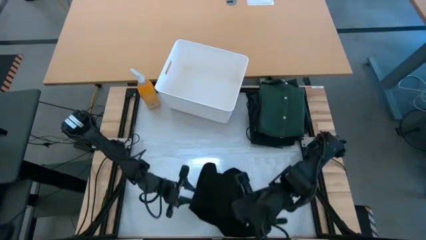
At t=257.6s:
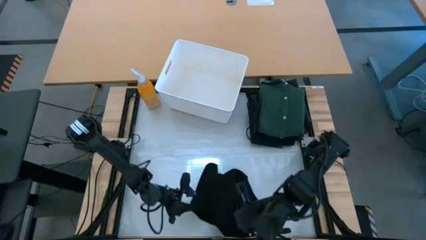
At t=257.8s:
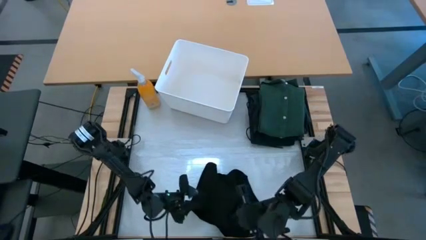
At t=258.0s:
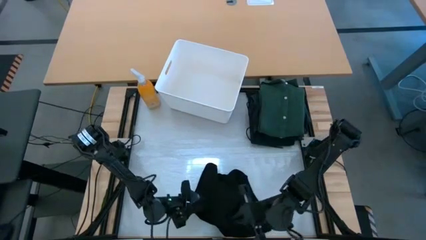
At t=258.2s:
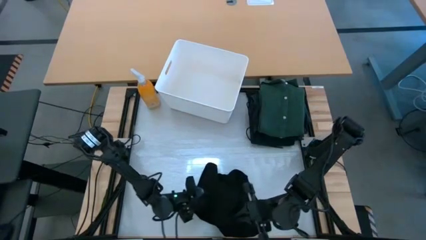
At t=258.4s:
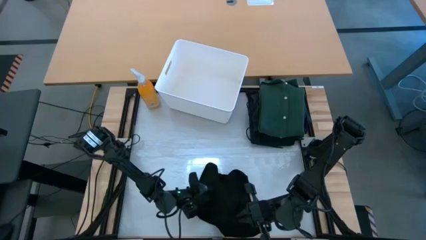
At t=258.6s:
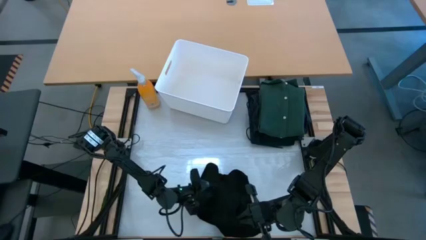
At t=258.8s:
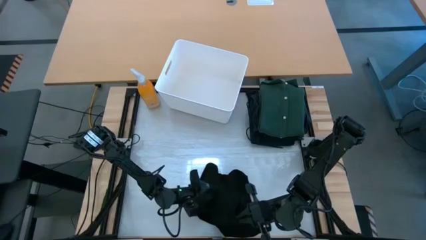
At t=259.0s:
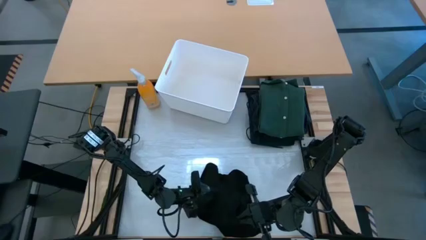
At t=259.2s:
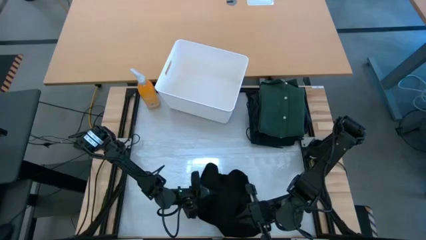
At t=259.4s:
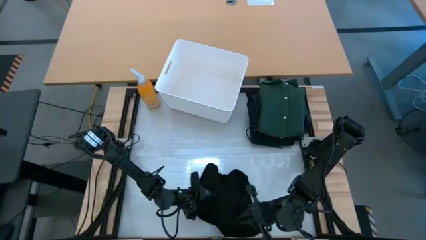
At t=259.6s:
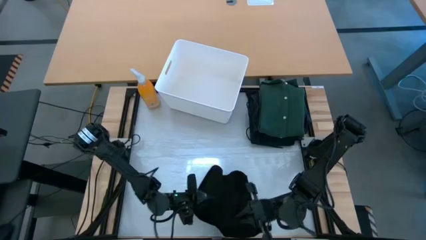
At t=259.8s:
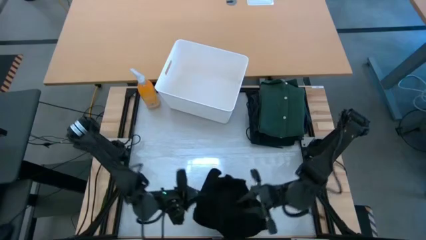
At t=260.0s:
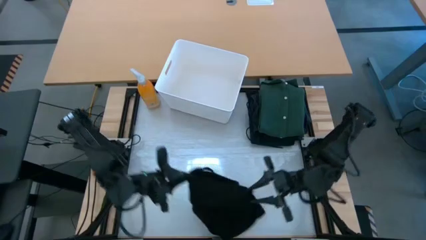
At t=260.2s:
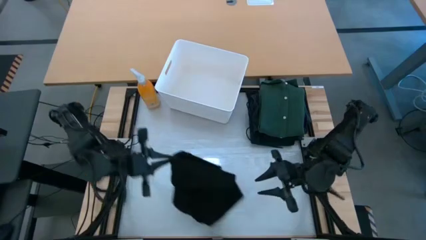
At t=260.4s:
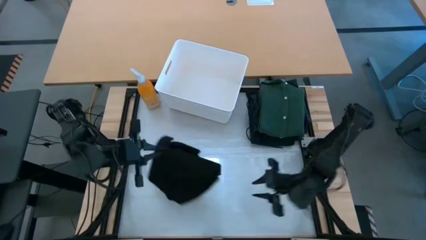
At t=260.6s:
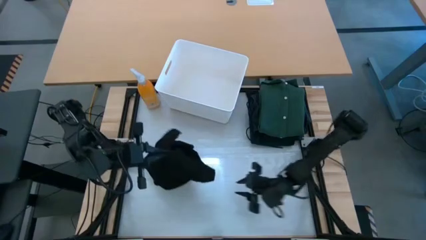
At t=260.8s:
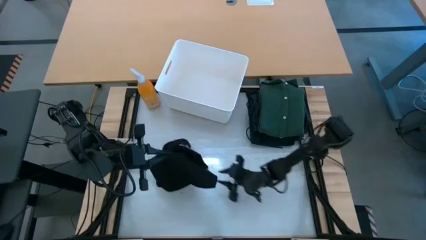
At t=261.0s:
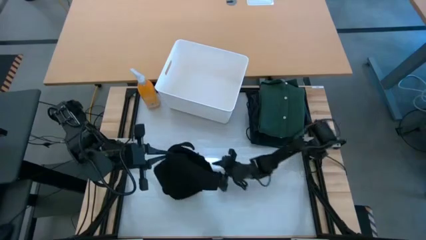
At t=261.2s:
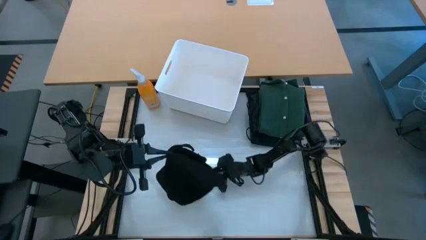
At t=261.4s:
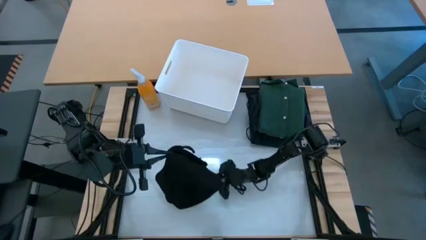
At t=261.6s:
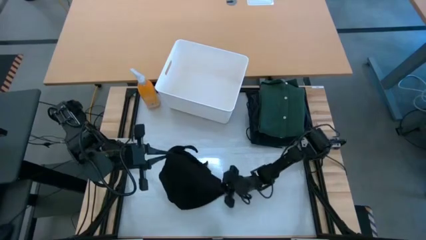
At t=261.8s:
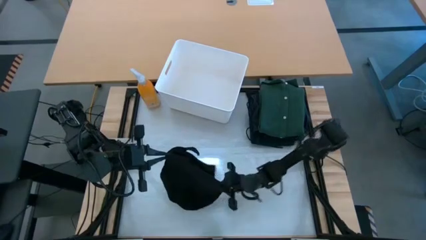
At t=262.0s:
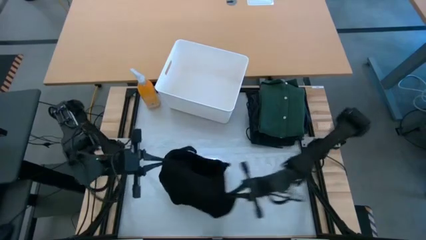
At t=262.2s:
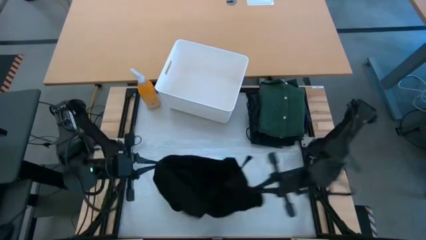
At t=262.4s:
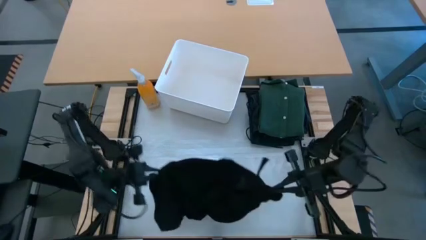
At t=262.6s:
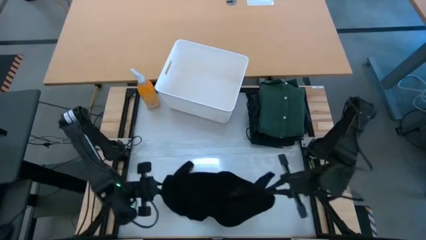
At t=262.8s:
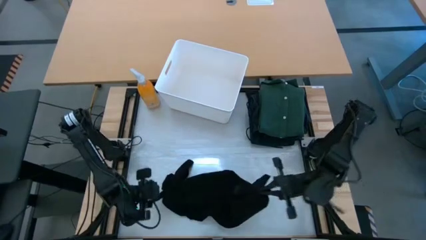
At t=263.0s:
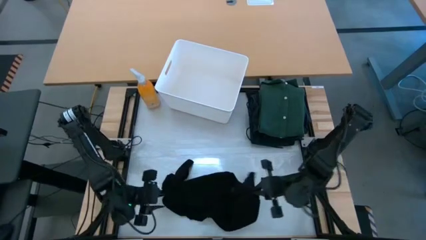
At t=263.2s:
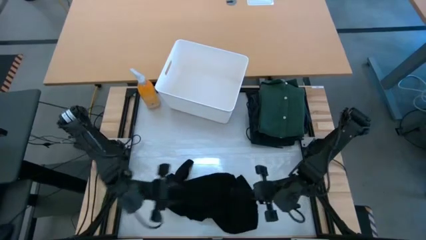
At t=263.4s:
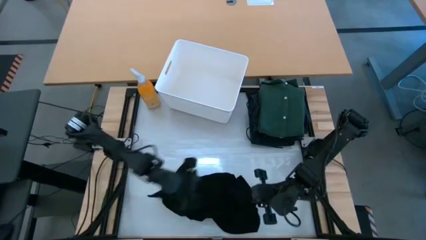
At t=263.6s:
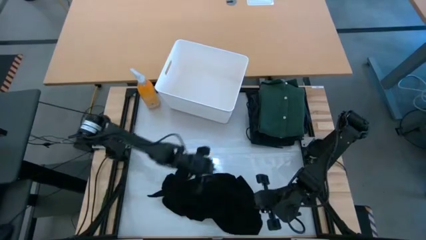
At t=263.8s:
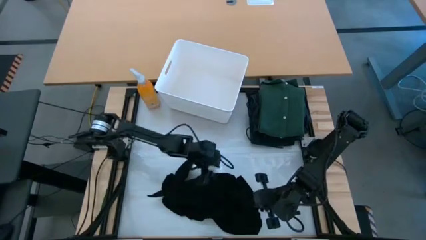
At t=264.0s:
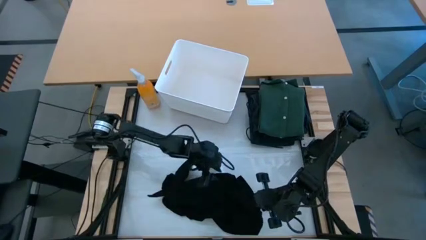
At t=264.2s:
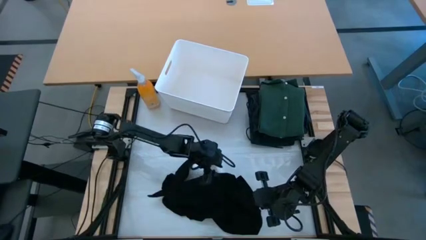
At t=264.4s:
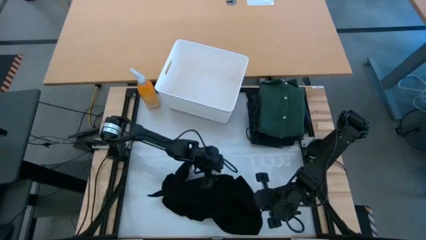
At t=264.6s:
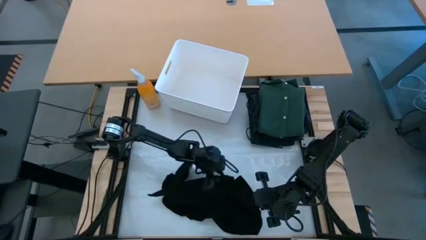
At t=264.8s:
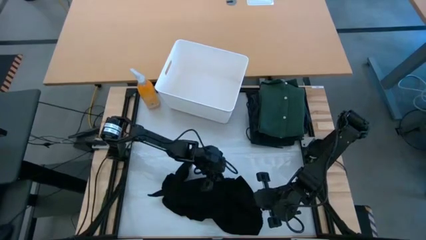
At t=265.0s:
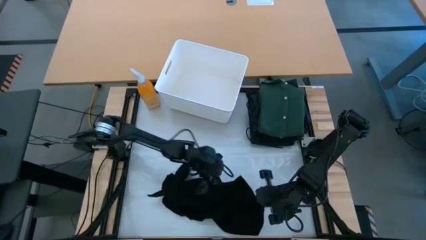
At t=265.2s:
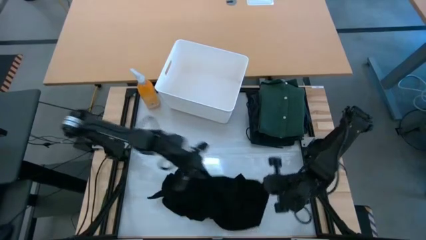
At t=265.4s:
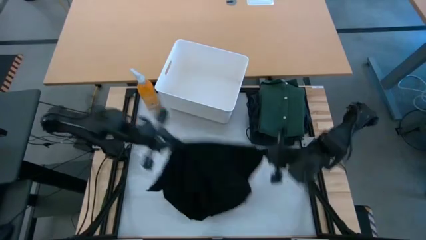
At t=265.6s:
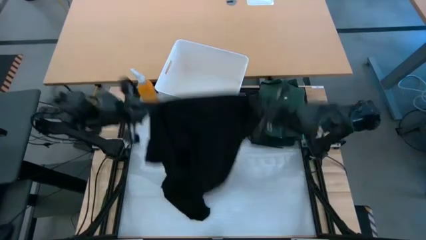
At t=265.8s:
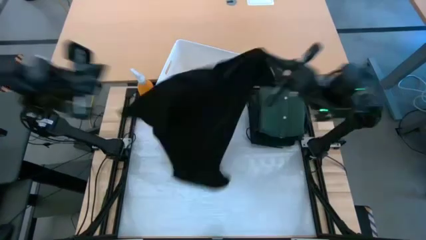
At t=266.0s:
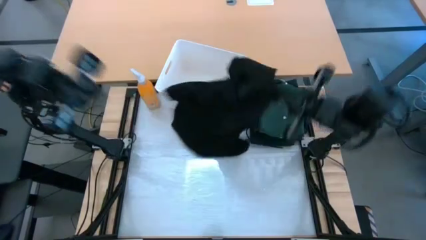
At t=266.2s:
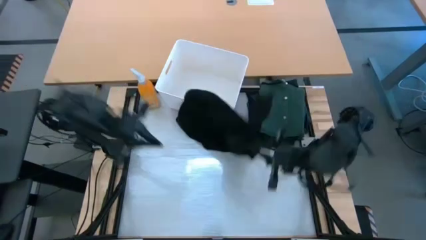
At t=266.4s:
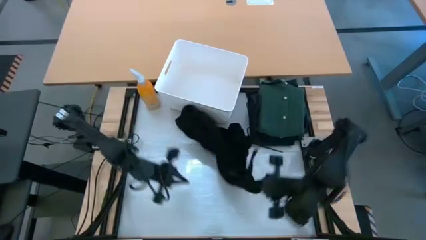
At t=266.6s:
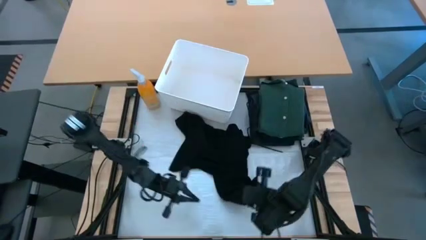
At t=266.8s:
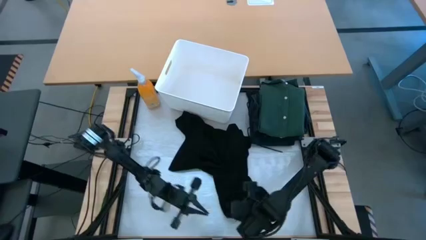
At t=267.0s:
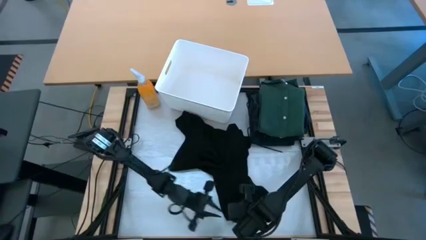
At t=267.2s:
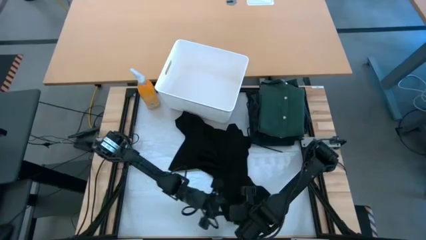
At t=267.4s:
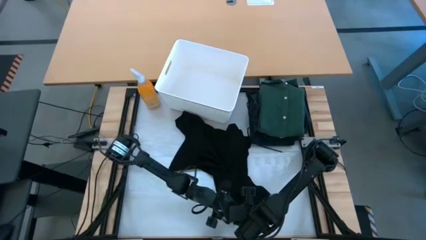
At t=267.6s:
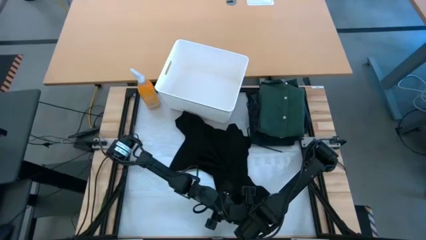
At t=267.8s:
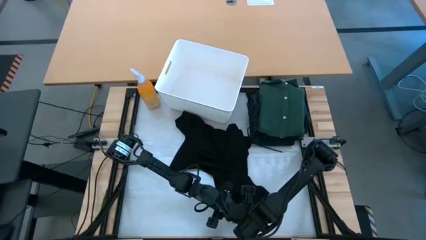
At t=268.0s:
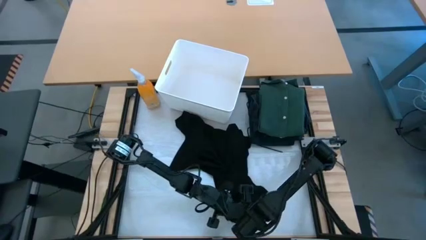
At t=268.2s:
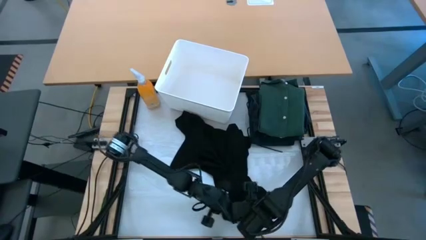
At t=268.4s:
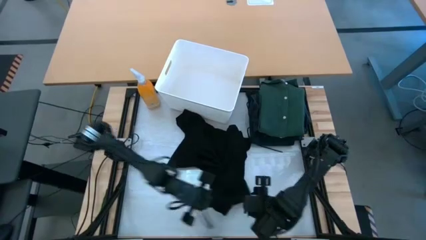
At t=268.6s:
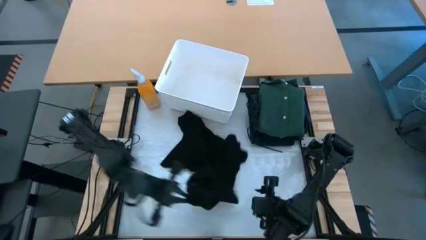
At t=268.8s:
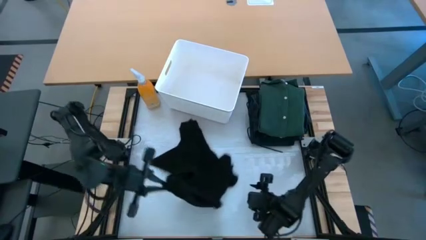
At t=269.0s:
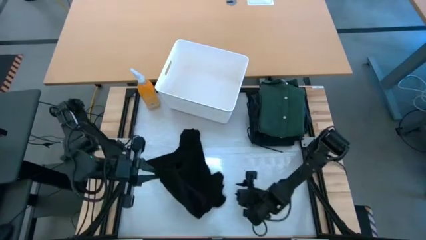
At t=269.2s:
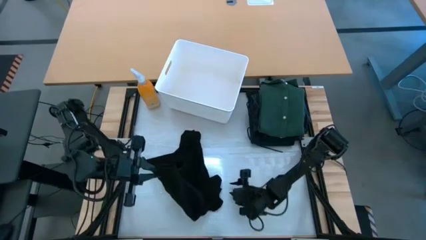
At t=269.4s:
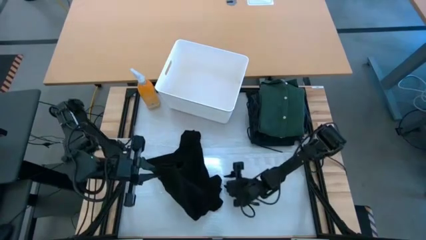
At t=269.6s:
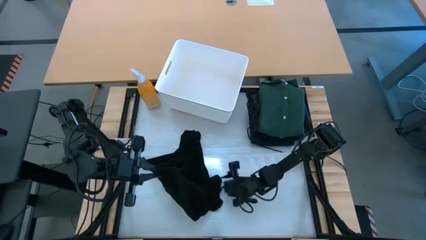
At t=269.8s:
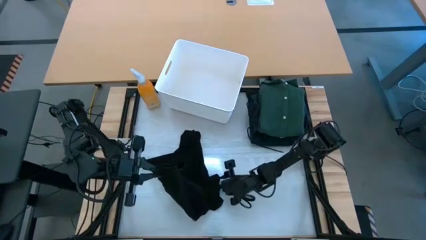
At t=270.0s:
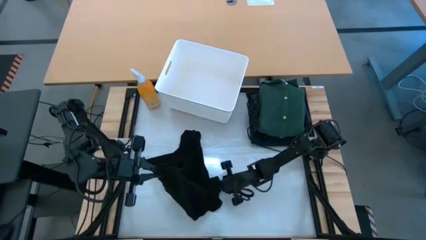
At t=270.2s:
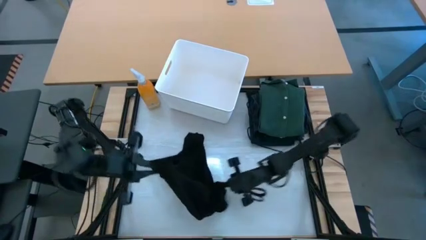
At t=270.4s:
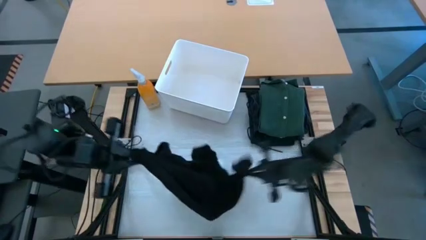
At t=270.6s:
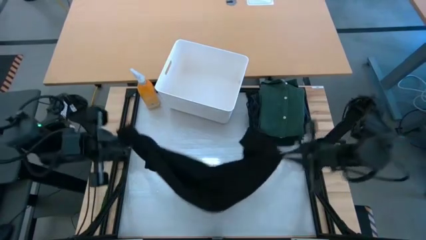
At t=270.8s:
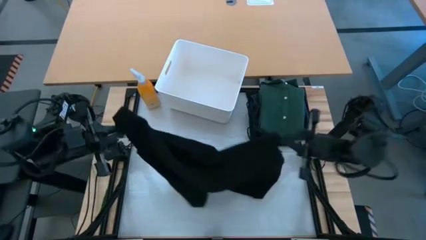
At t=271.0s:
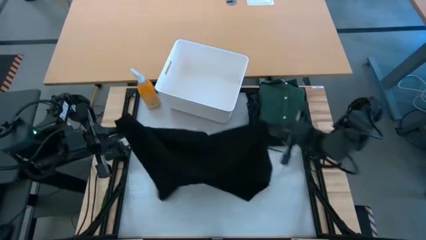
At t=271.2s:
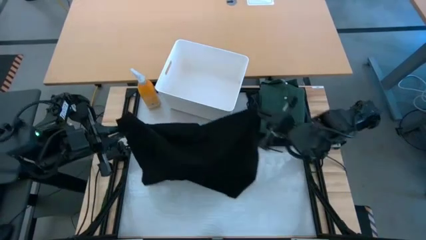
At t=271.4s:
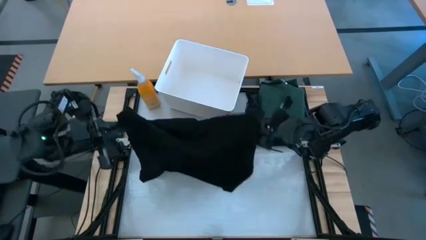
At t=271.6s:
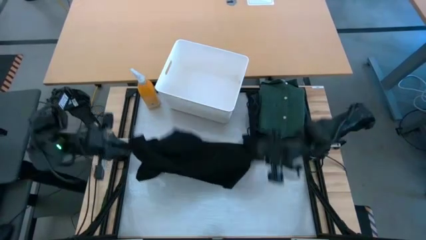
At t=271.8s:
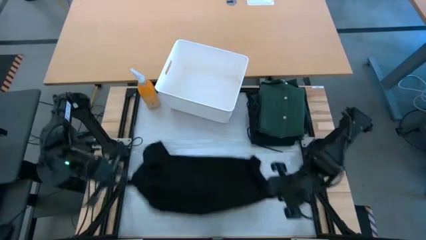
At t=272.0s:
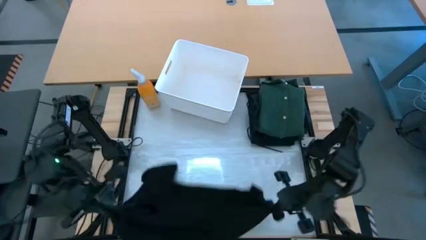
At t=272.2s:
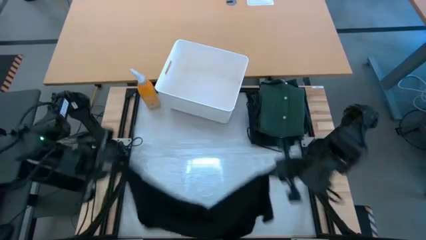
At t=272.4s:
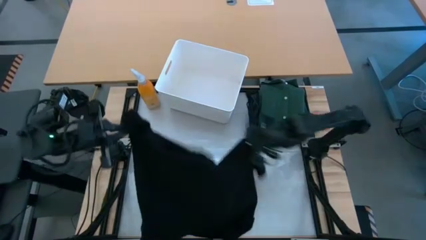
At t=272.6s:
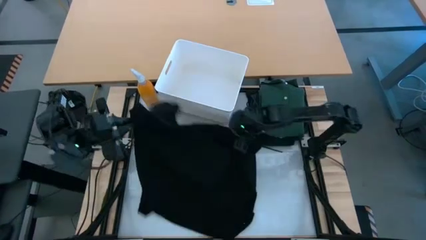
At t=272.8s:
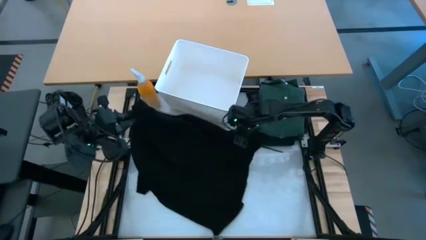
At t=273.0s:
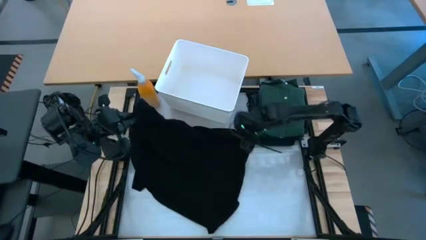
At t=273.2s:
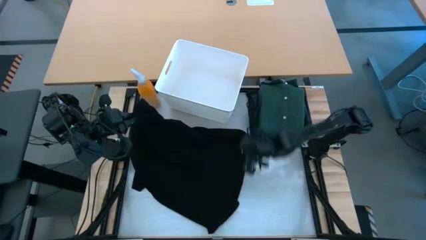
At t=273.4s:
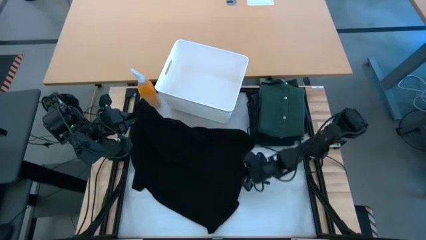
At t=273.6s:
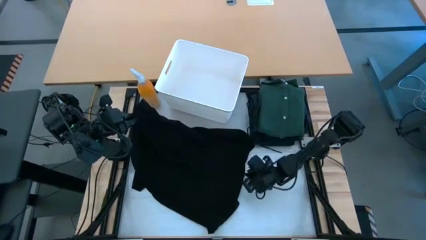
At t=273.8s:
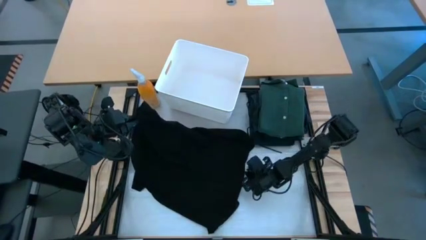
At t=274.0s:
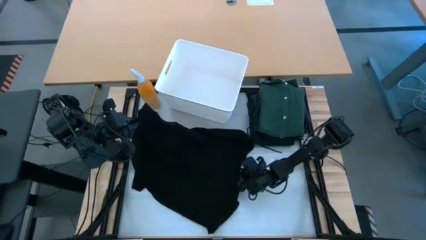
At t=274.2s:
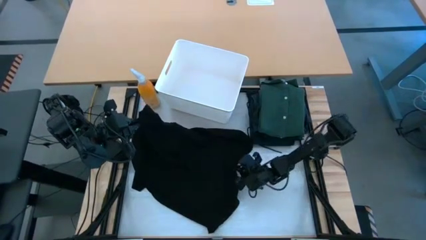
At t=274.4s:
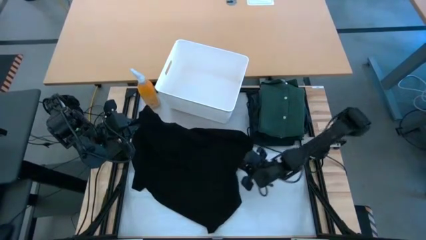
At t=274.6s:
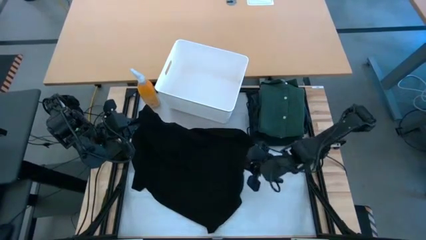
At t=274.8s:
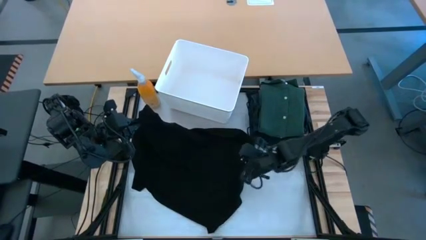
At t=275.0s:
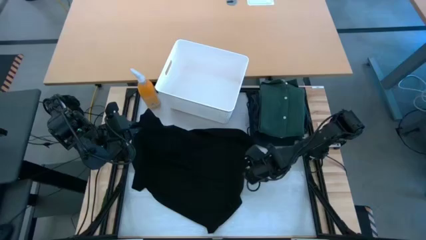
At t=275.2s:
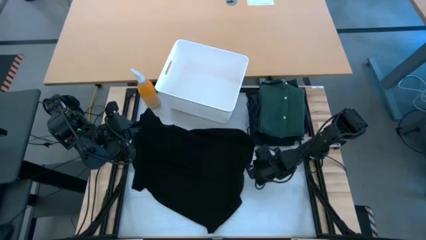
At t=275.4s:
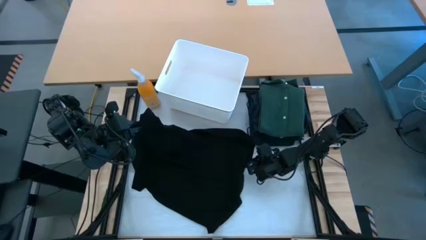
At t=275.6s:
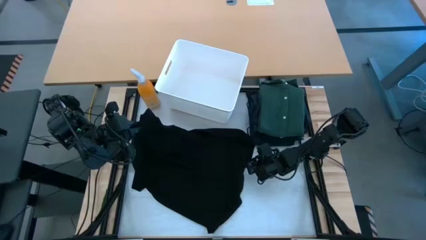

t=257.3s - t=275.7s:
Task: Fold laundry
Fold the black shirt
